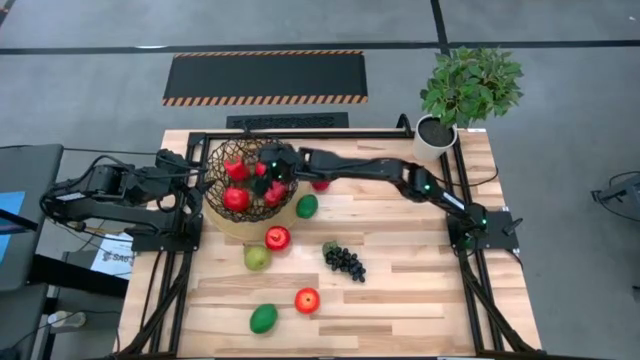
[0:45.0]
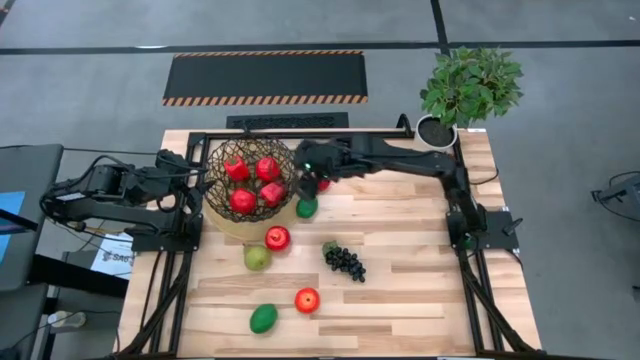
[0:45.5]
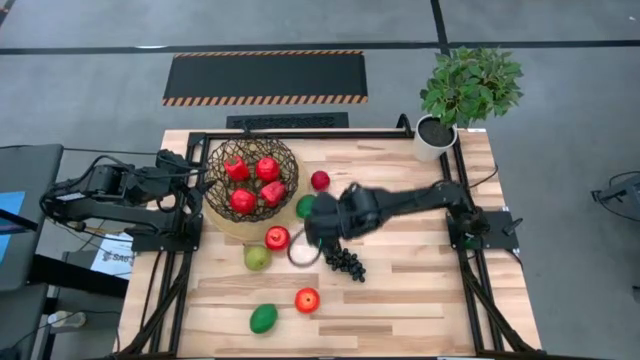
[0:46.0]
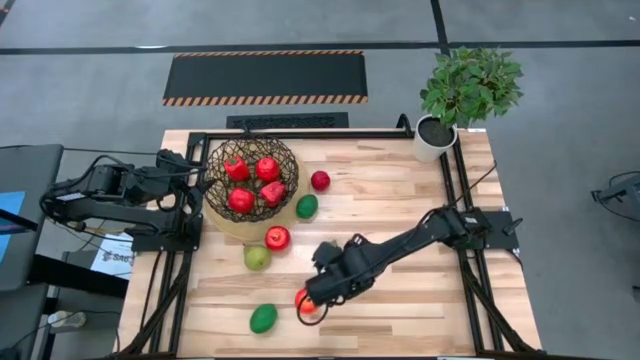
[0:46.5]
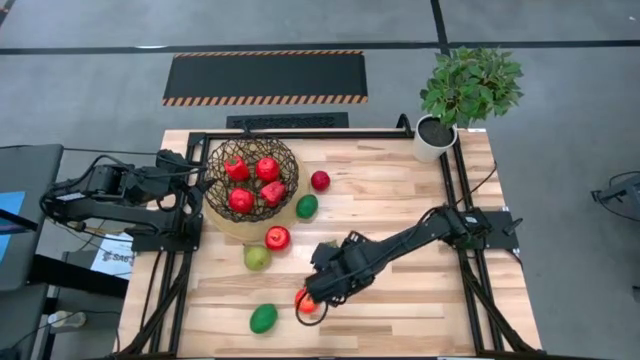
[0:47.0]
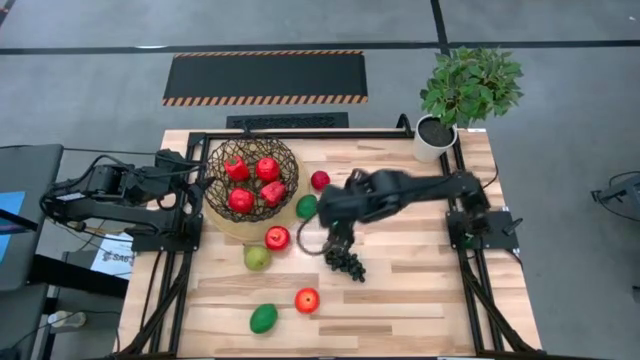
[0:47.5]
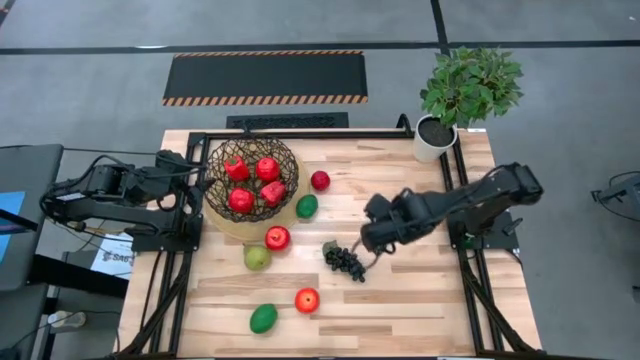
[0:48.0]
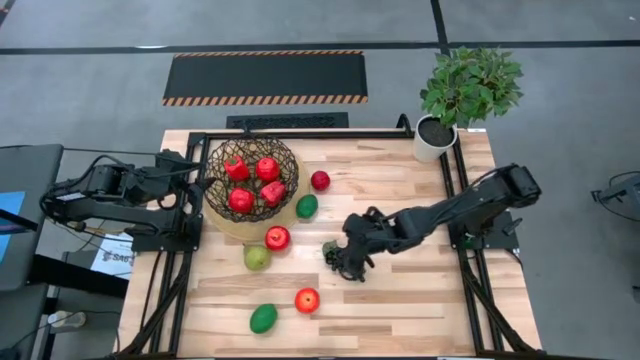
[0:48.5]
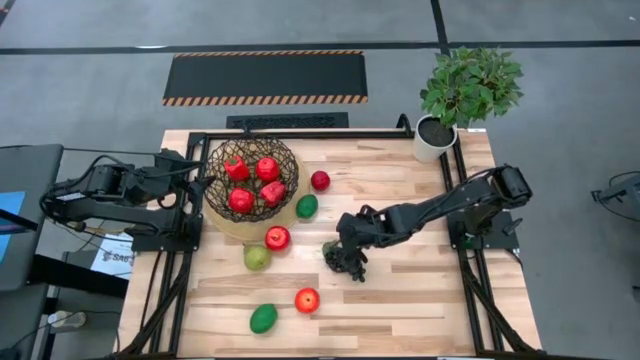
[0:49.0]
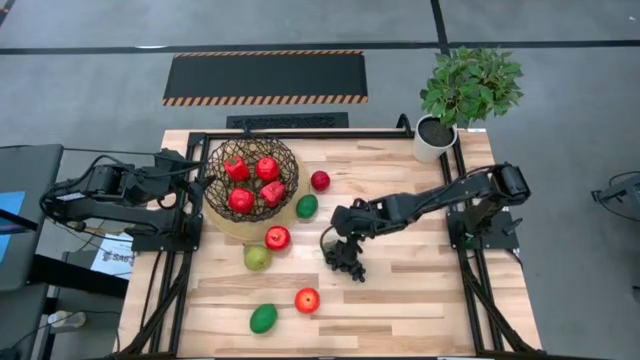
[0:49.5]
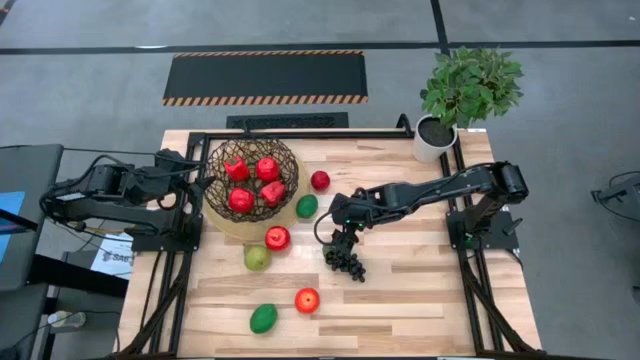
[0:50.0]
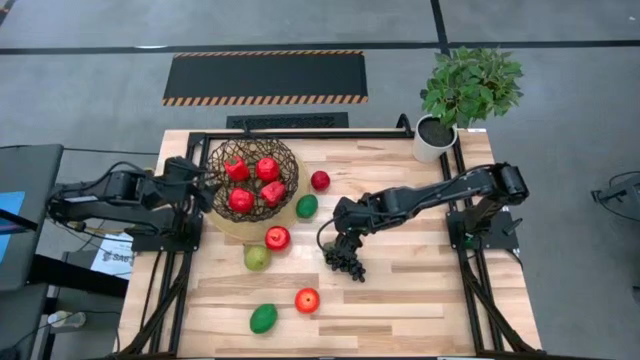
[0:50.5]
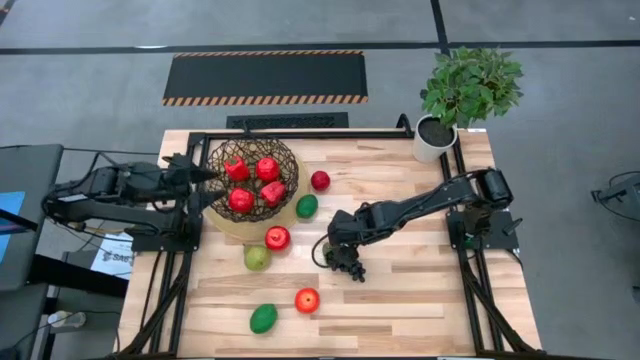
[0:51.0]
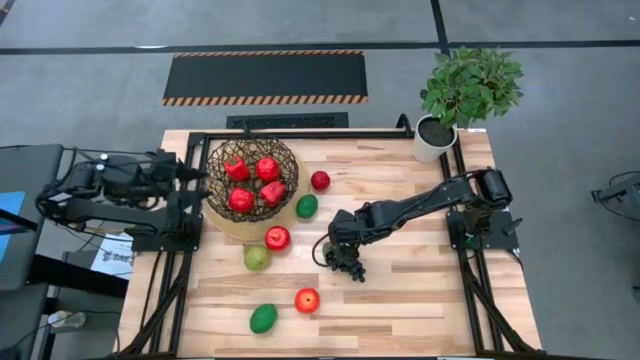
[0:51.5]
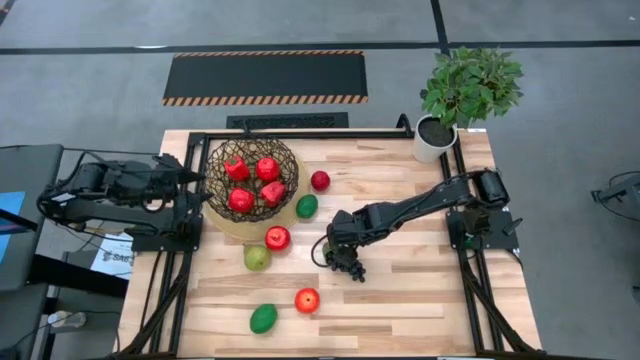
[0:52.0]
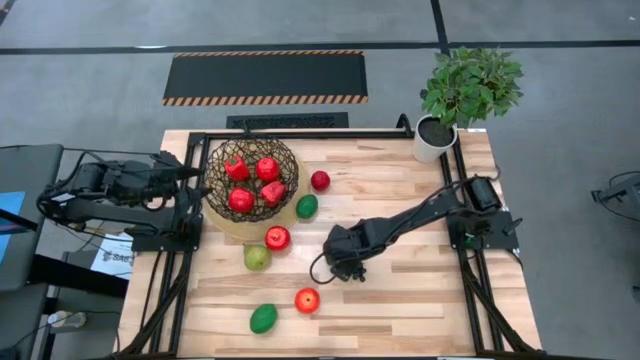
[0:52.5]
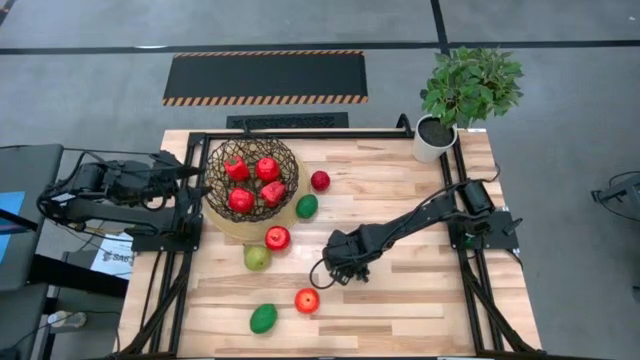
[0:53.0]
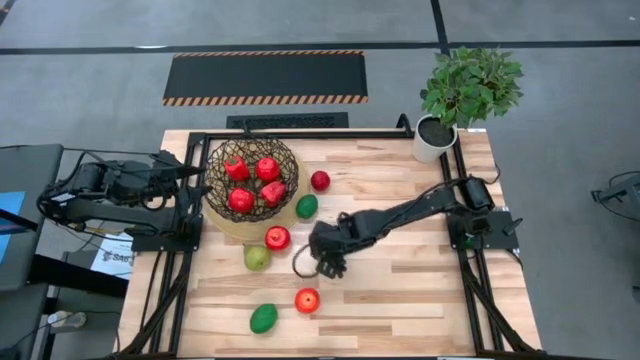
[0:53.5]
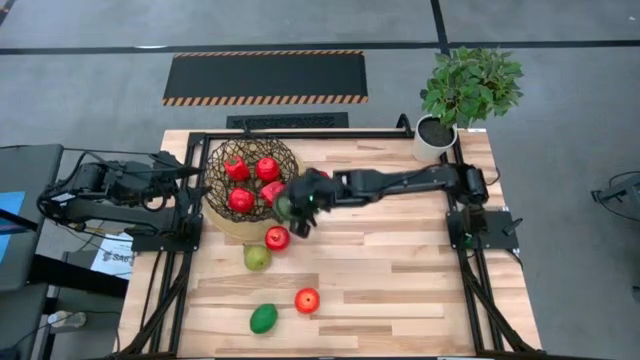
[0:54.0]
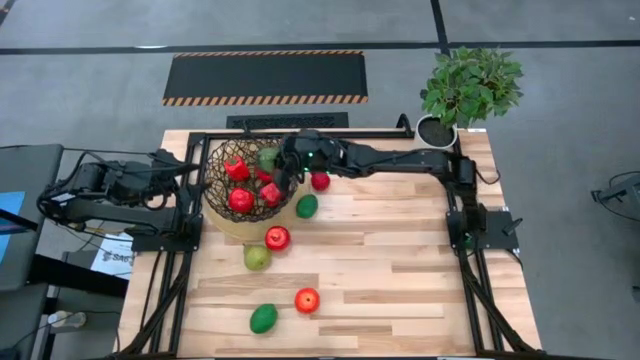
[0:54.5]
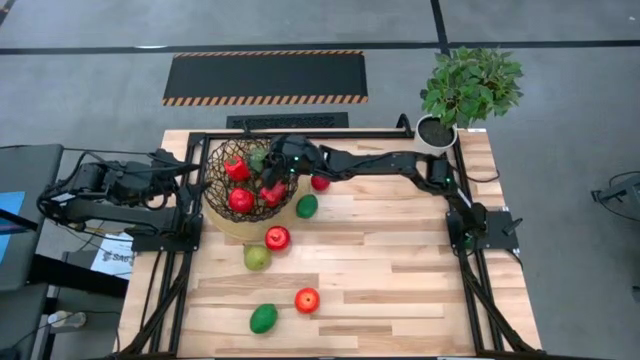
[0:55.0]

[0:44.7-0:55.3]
Task: Build produce basket
Put the black grapes into the black wire basket

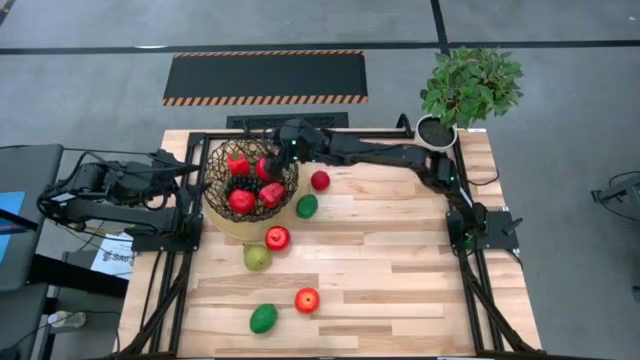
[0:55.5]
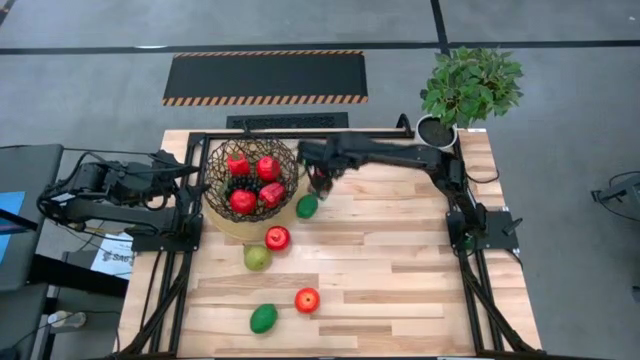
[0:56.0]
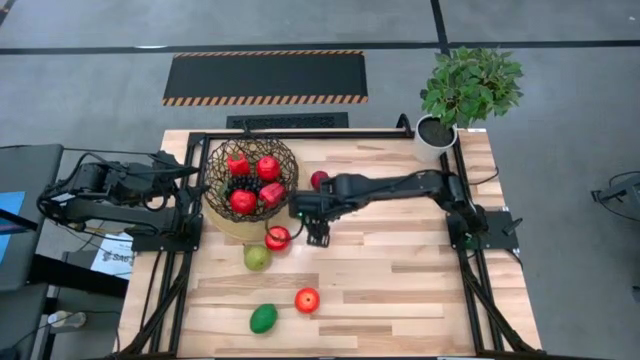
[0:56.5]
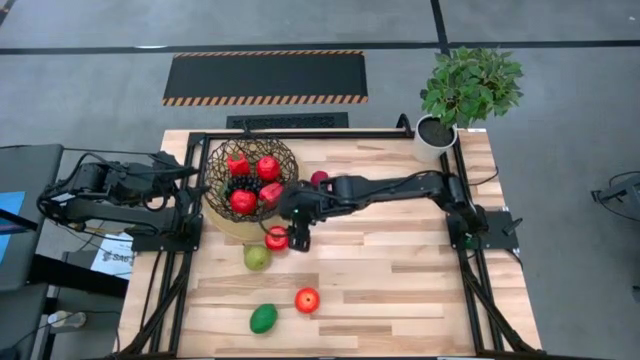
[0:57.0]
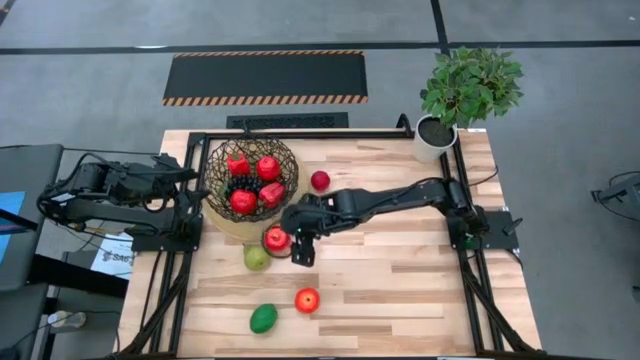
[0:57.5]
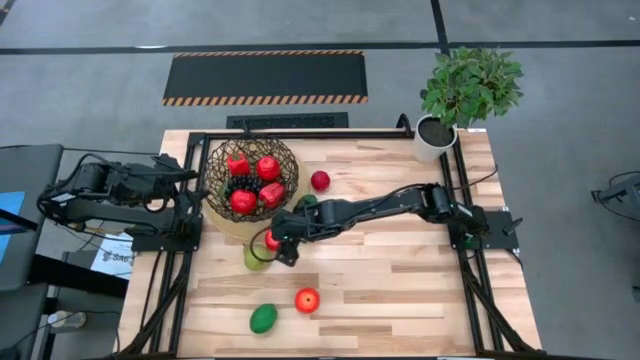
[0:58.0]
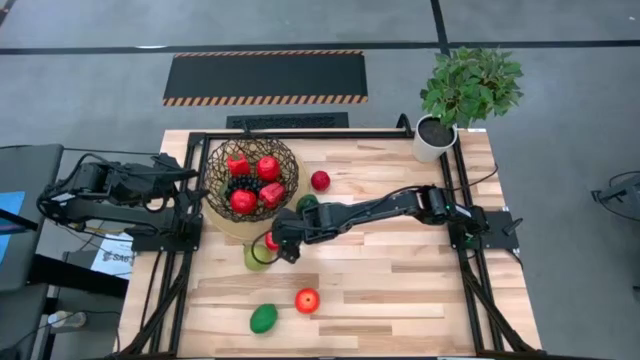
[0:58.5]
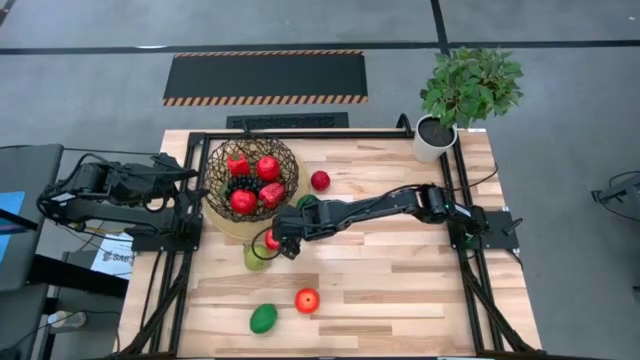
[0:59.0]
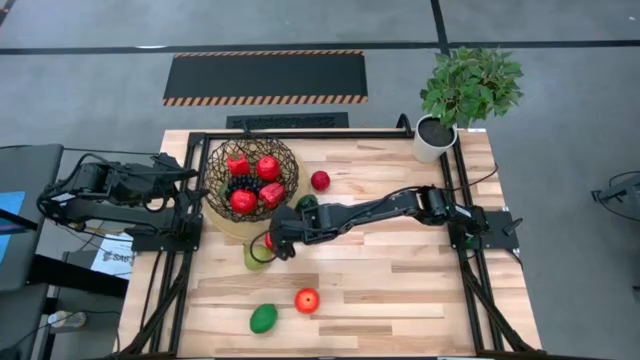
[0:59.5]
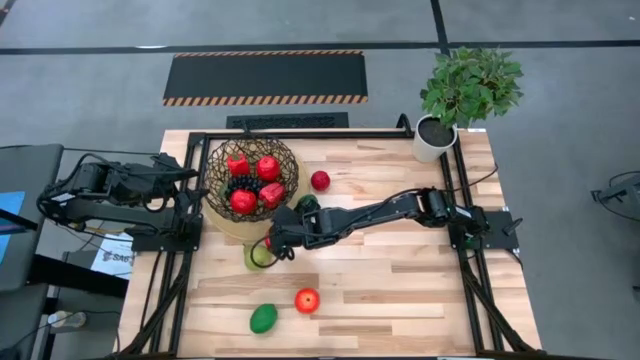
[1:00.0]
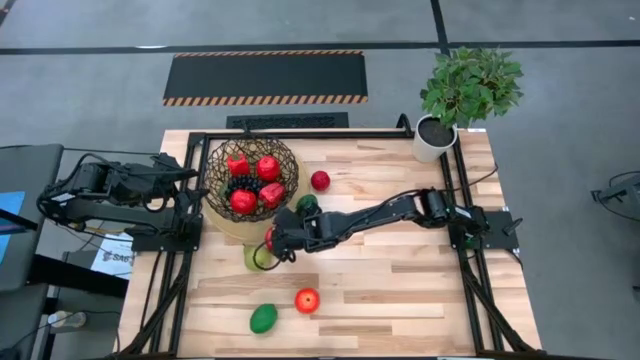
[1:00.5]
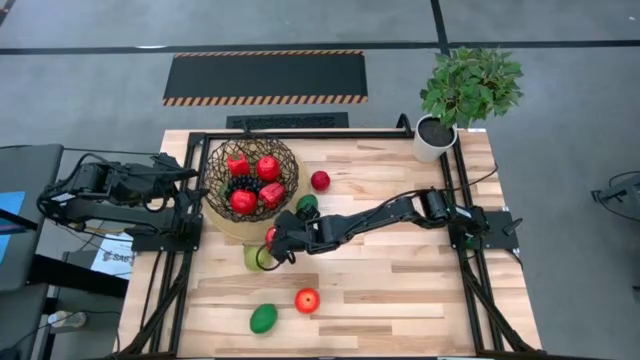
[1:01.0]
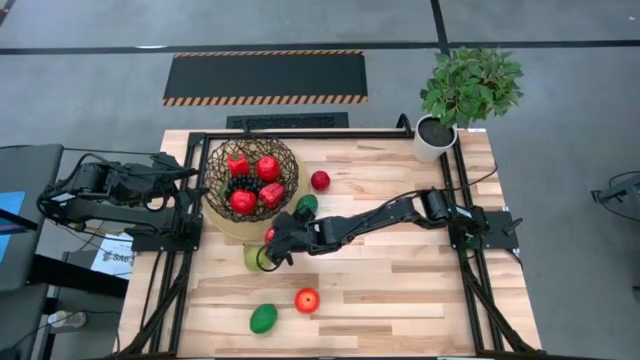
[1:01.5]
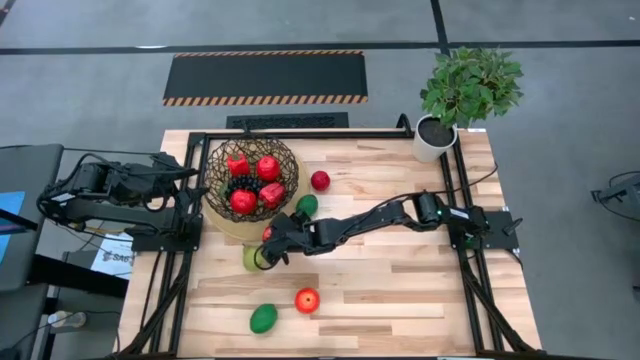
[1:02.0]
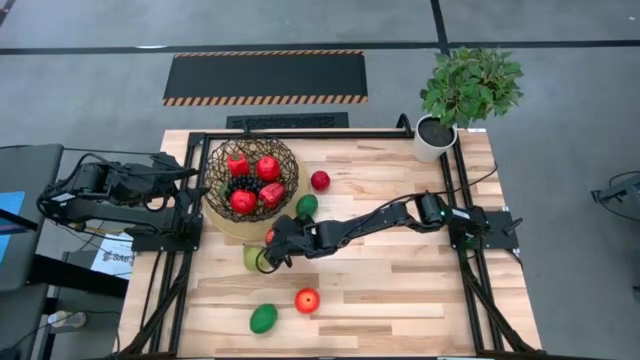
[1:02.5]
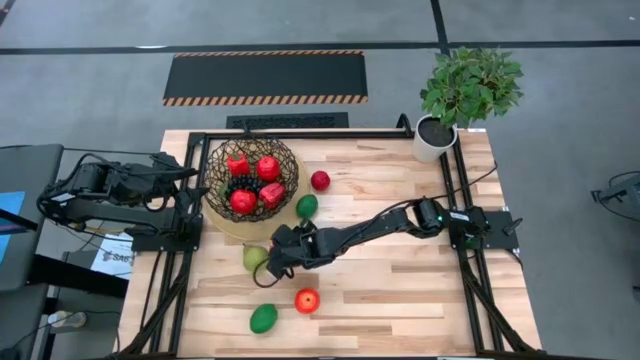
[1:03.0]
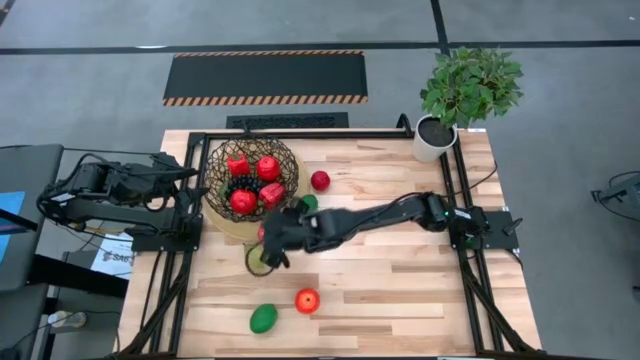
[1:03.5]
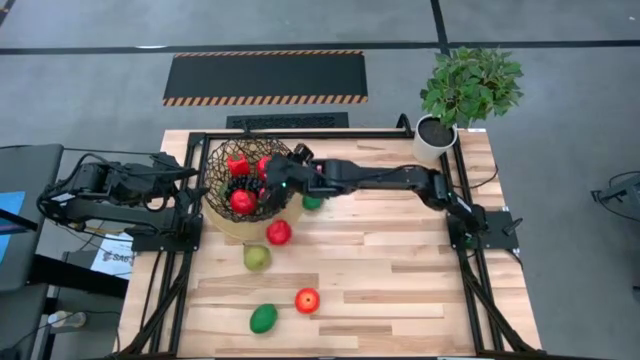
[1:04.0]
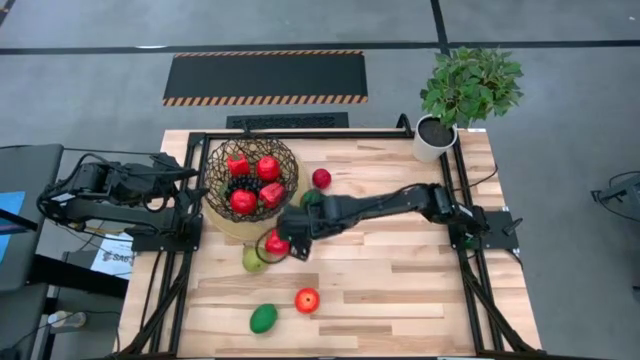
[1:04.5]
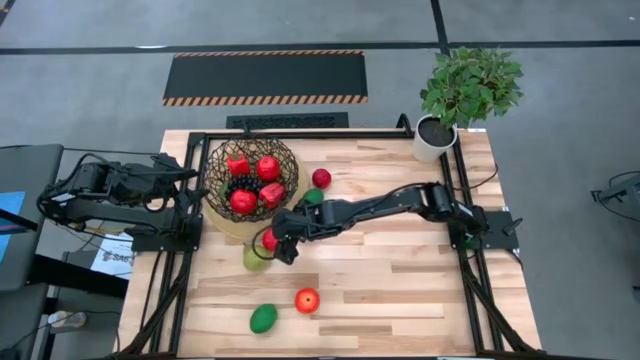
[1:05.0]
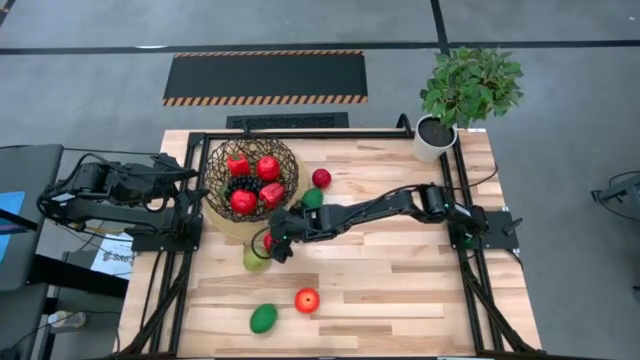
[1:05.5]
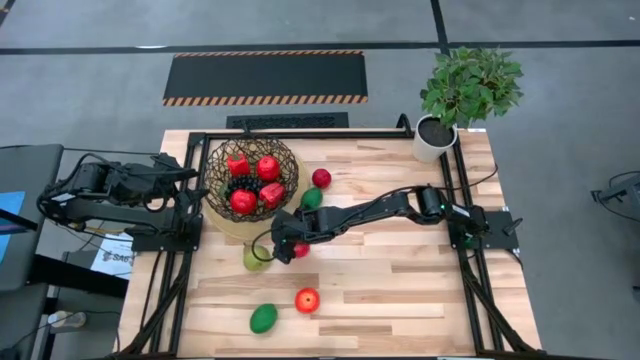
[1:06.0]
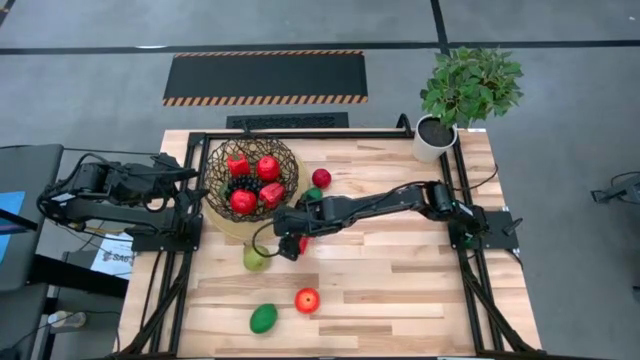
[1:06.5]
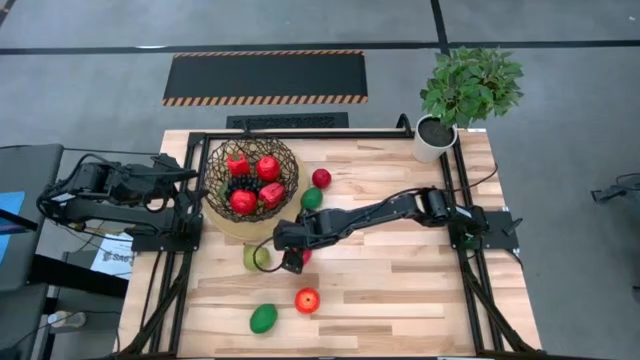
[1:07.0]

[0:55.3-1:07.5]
Put the red apple into the black wire basket
